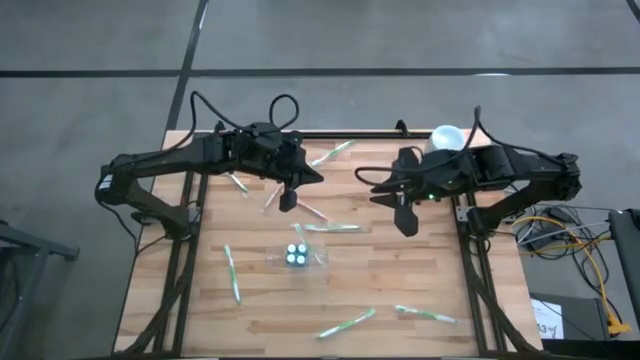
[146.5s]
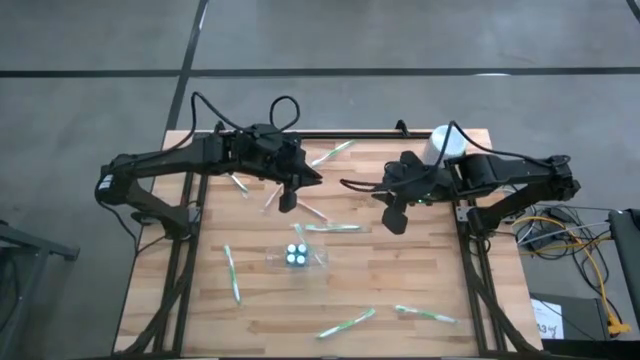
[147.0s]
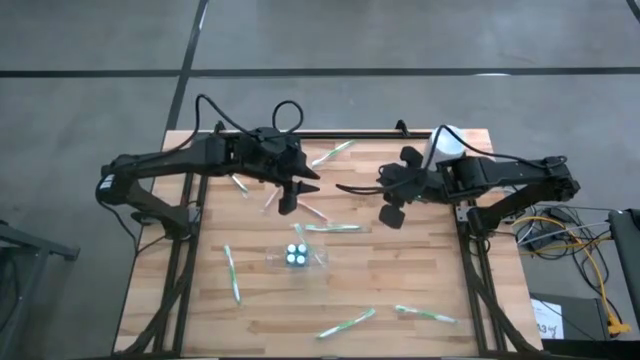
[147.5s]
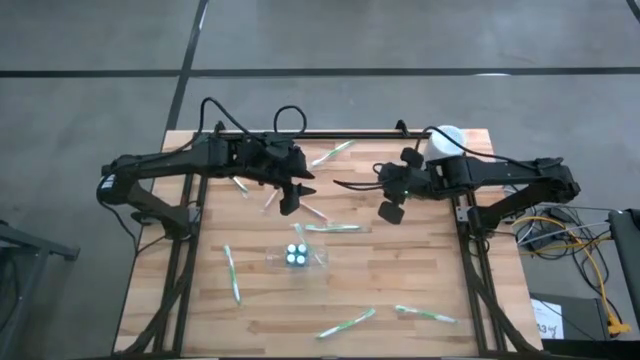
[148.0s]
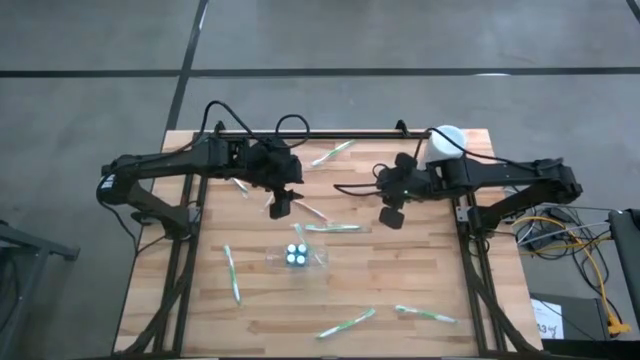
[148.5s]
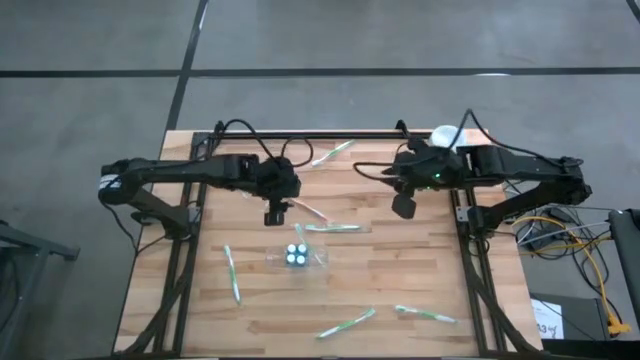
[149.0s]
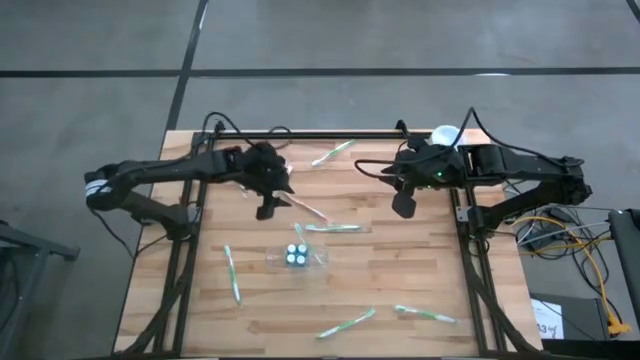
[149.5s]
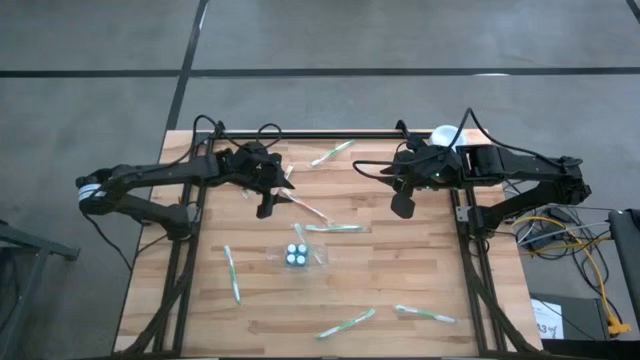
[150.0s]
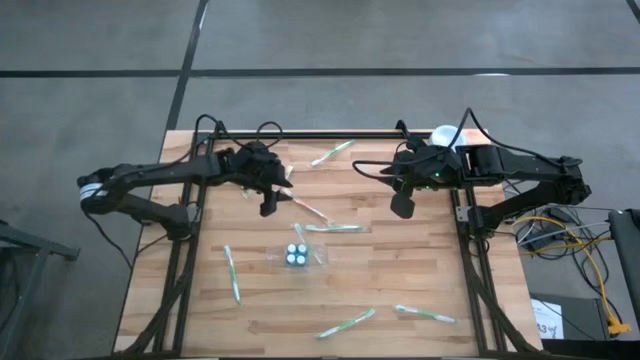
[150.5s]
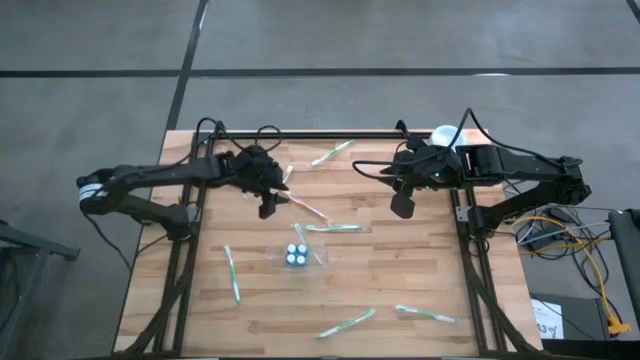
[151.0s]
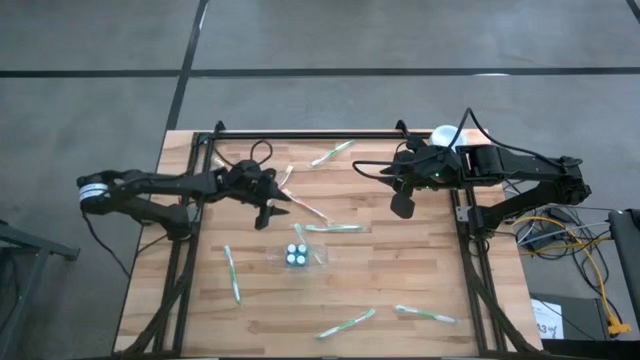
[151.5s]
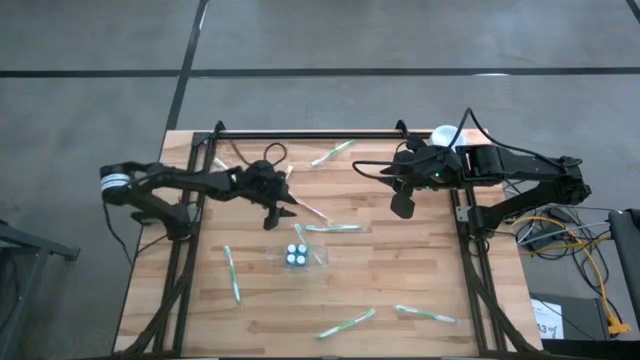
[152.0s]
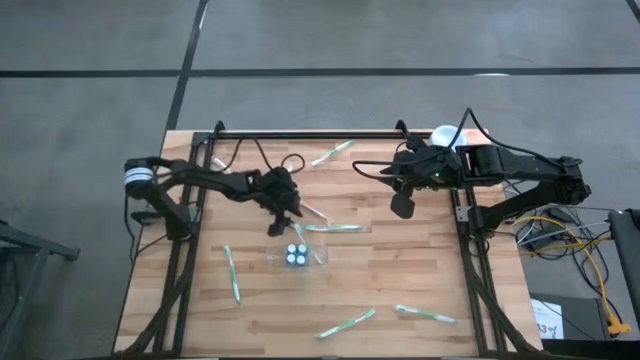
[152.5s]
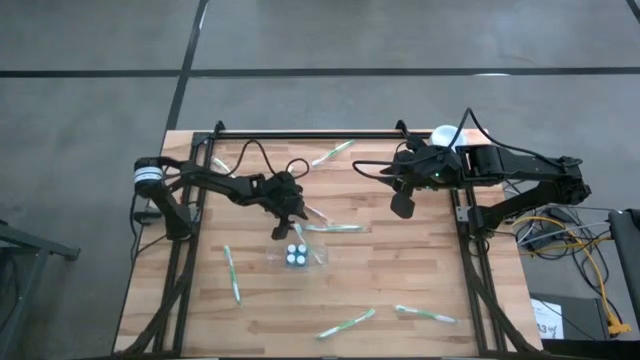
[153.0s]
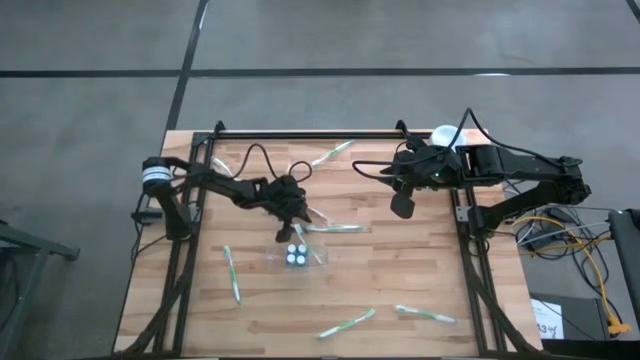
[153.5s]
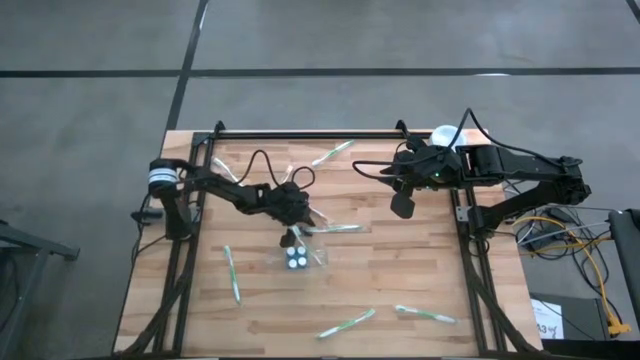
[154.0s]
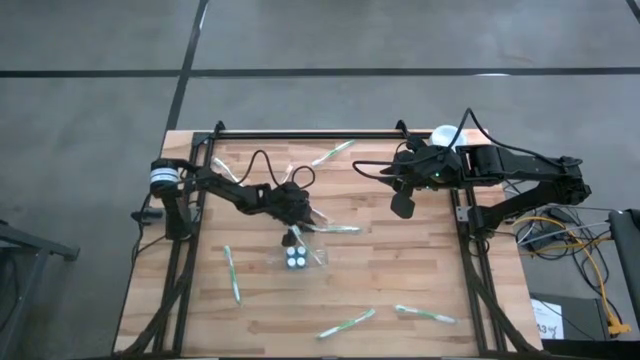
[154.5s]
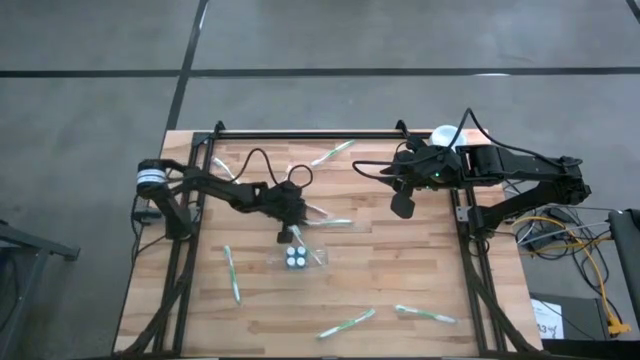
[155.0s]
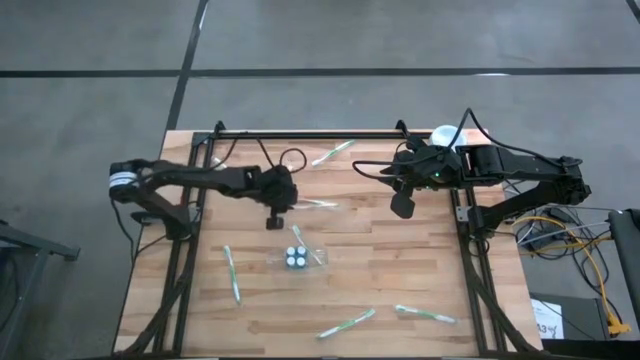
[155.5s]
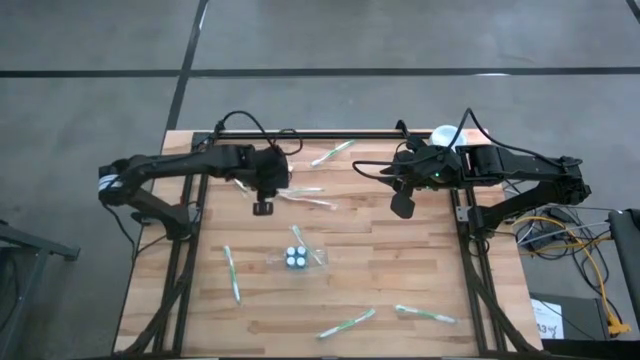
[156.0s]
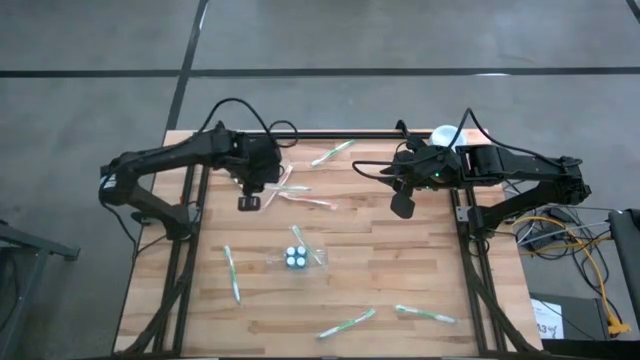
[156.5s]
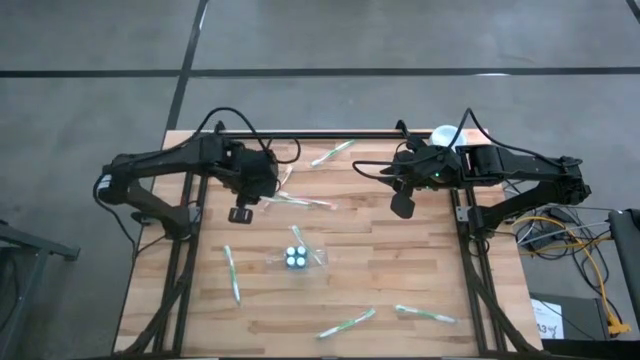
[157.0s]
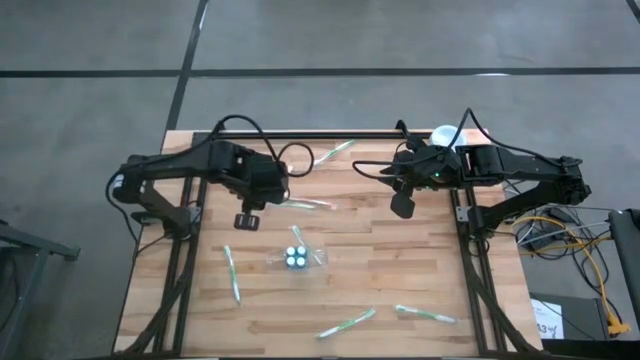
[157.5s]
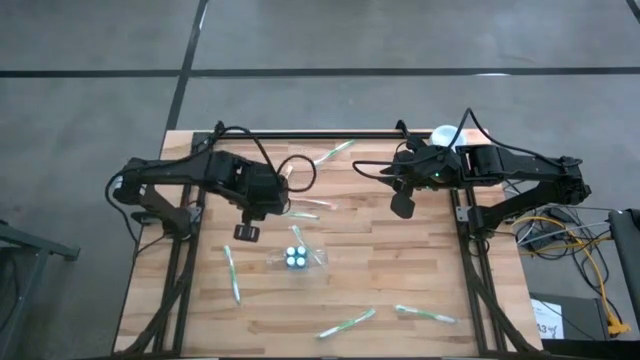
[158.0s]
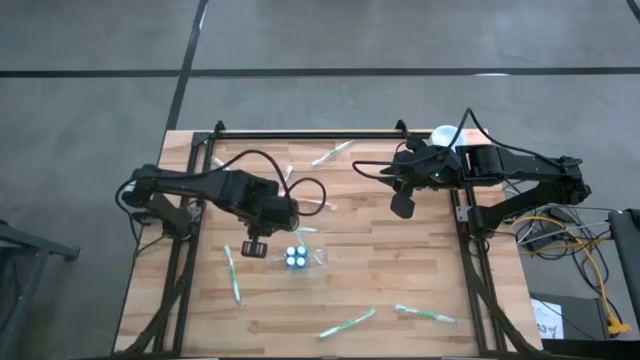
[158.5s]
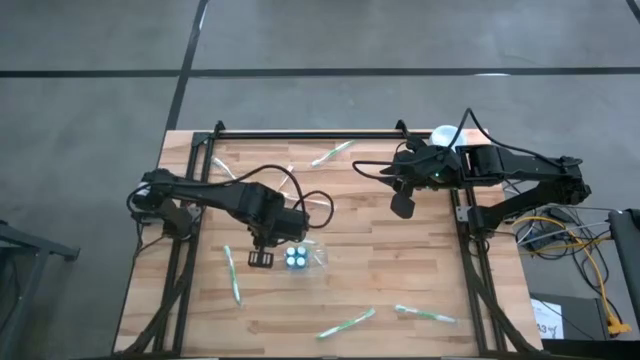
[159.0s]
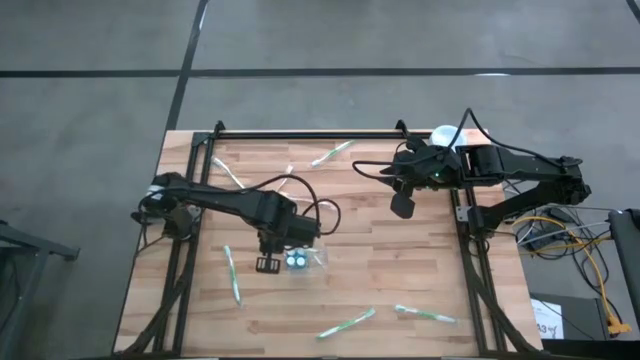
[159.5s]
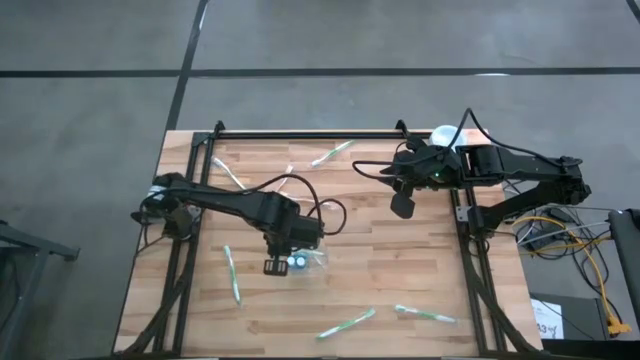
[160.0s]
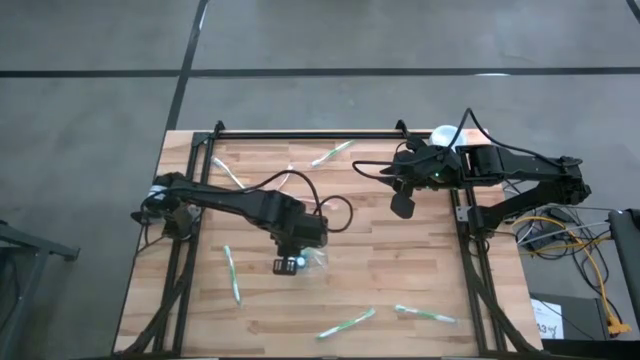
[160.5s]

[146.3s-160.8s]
Task: Pick & Place toothbrushing station
Put the green toothbrush into the transparent organizer

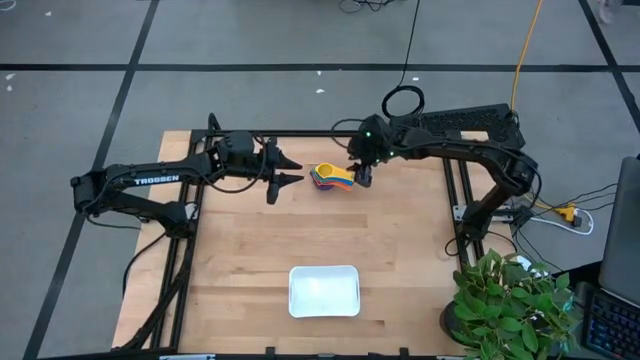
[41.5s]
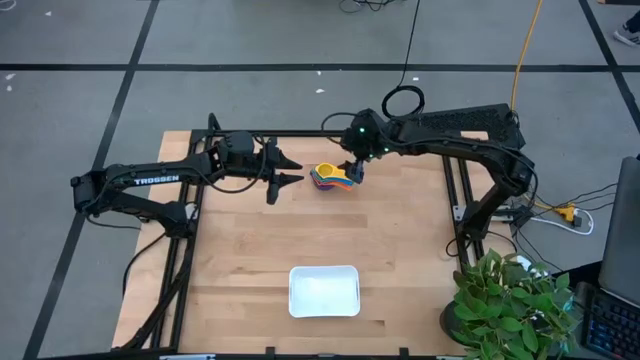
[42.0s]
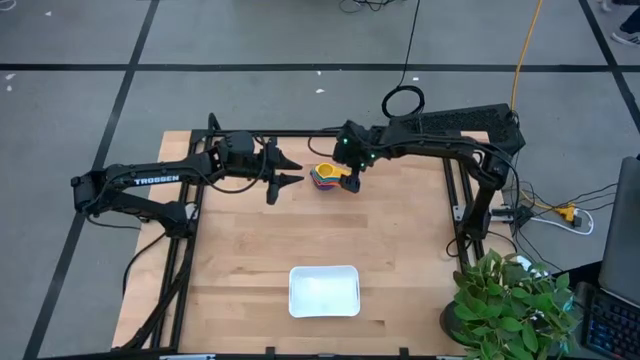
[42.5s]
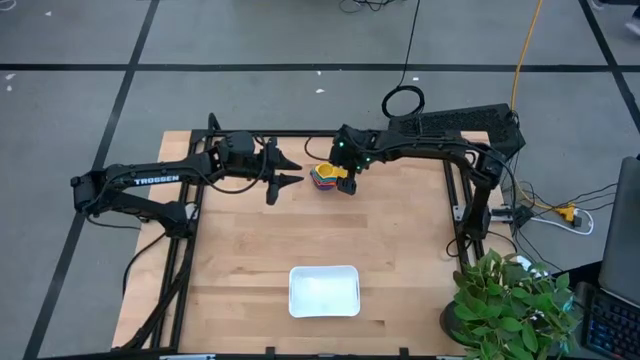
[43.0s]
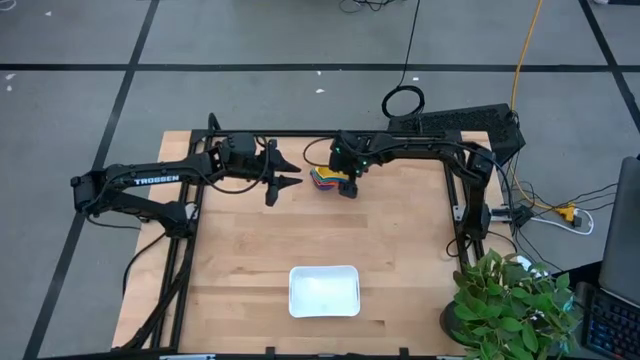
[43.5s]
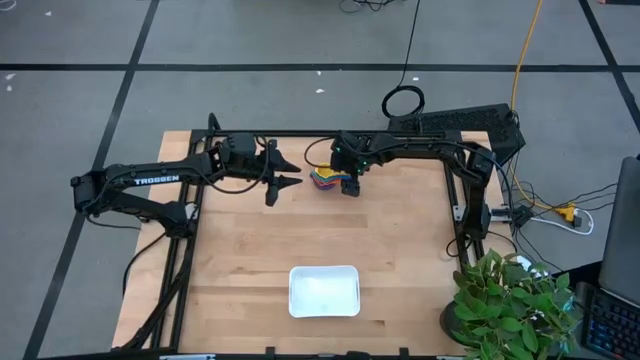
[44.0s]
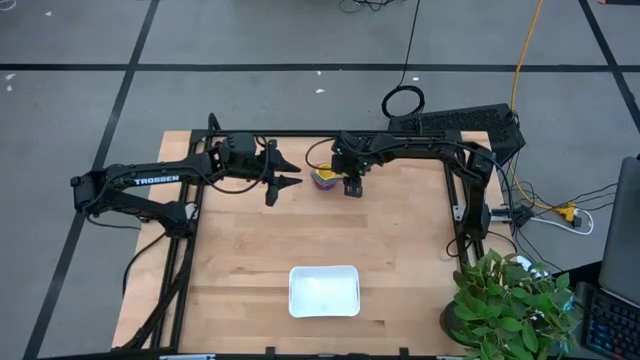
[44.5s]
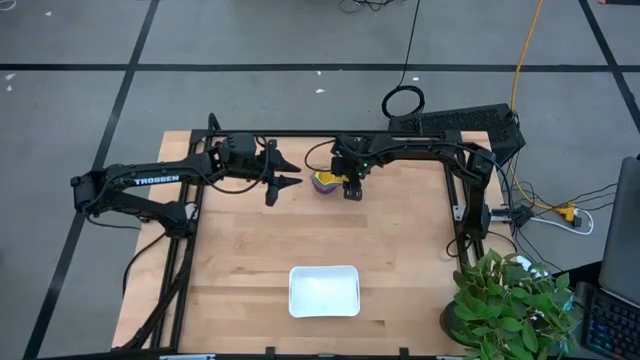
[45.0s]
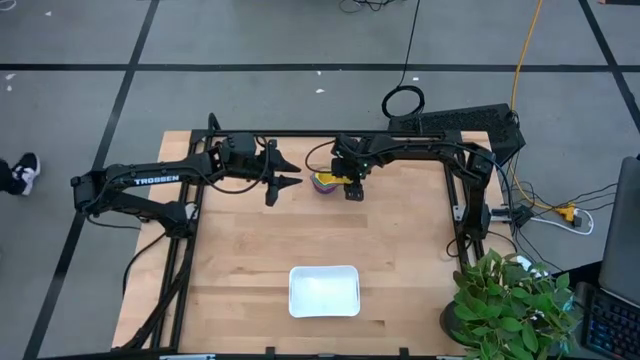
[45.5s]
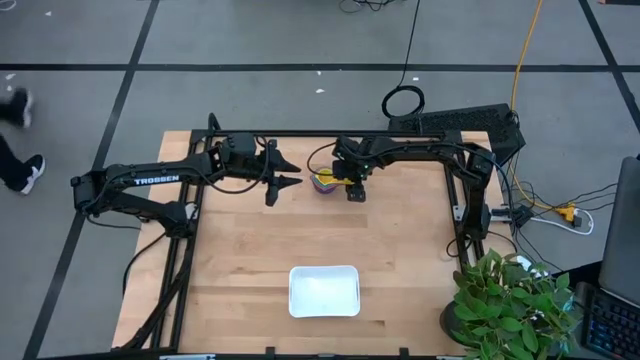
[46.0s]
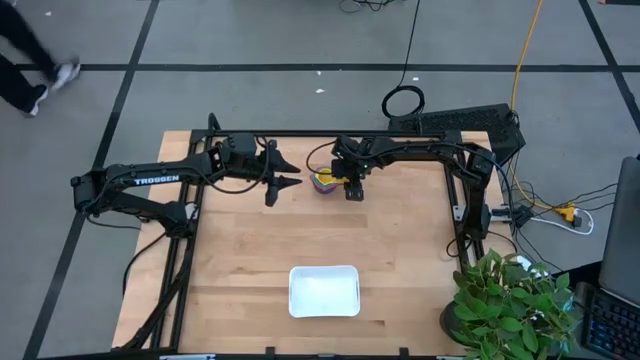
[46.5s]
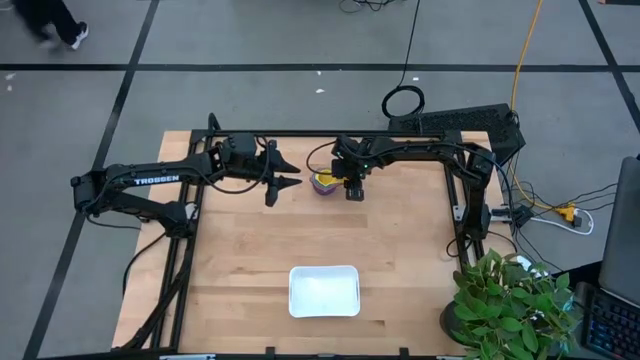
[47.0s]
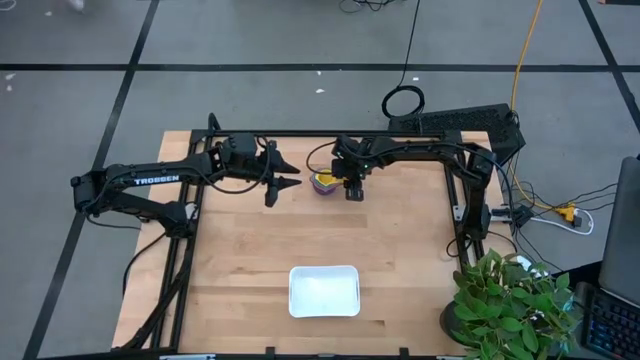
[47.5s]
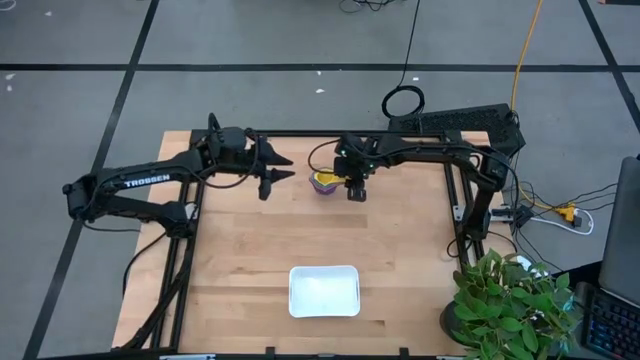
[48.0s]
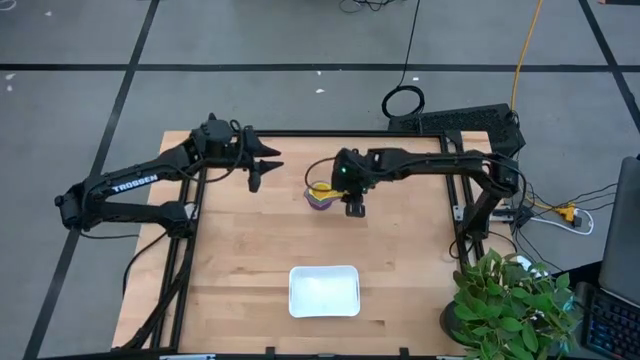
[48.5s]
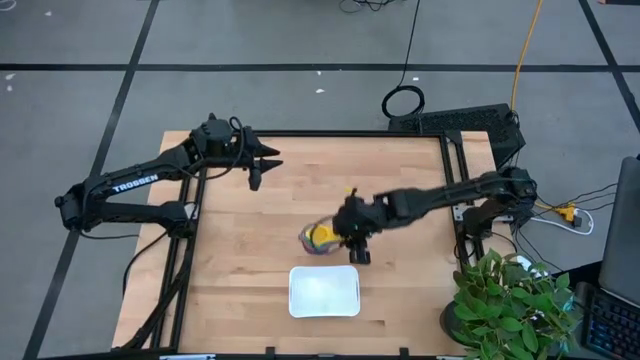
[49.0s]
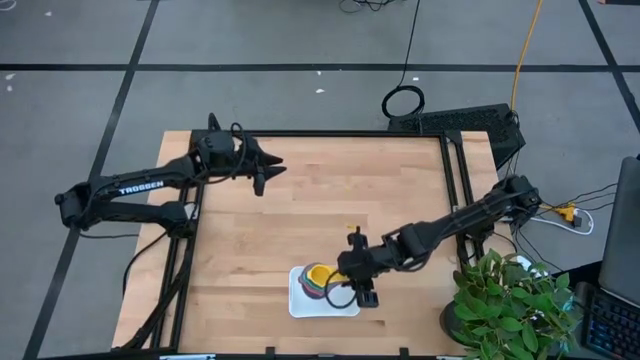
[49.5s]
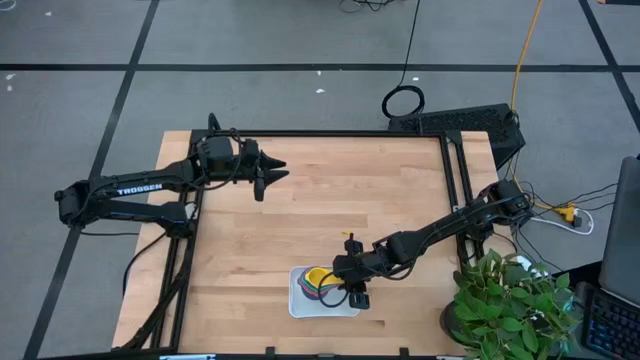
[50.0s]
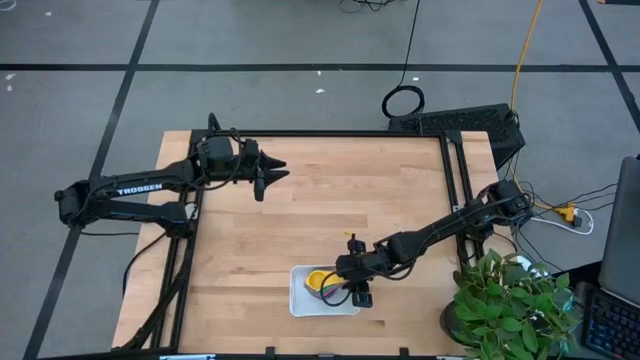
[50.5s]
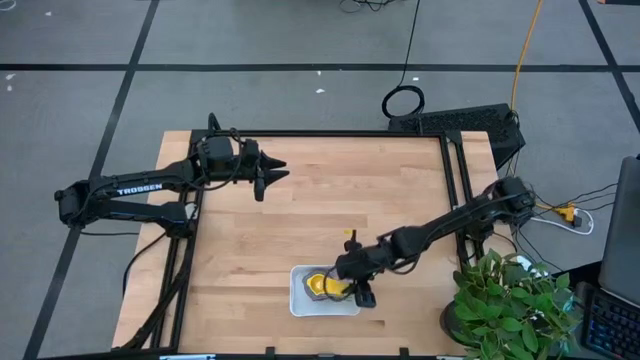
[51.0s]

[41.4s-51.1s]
Task: Nest measuring cups in basket
Put the nested measuring cups into the white bin
